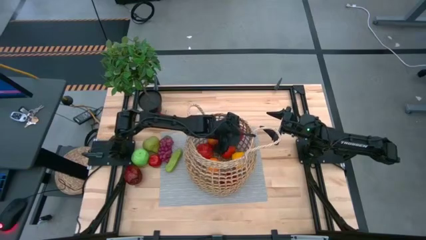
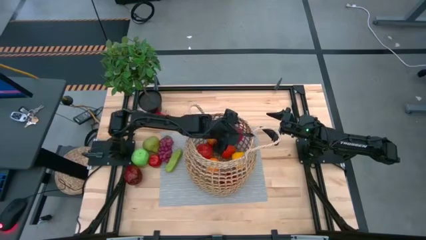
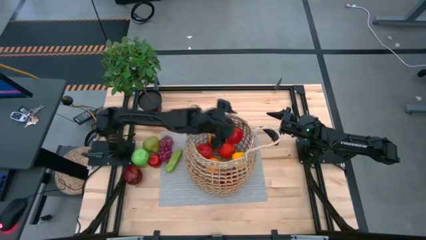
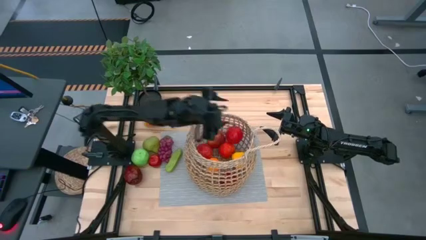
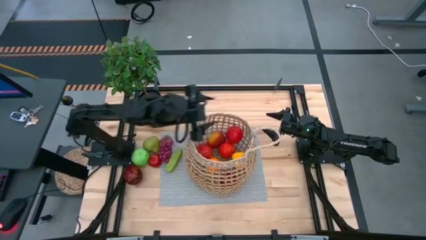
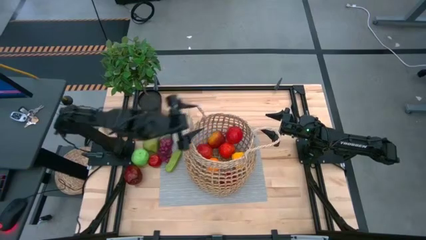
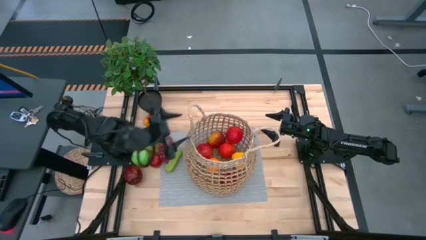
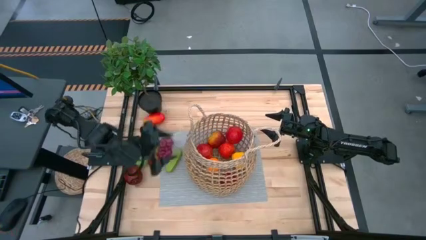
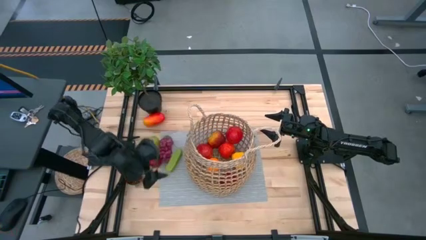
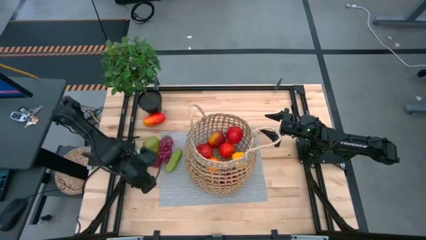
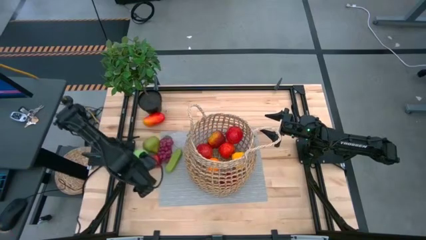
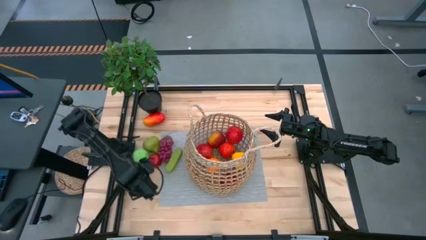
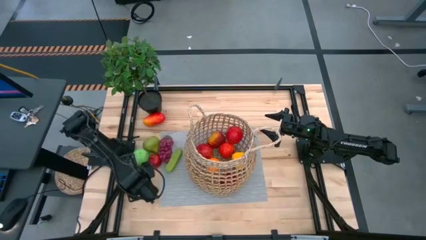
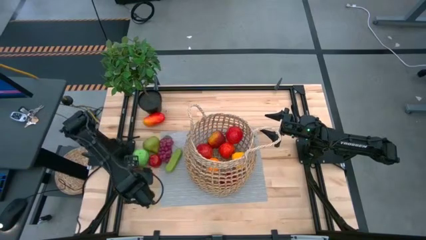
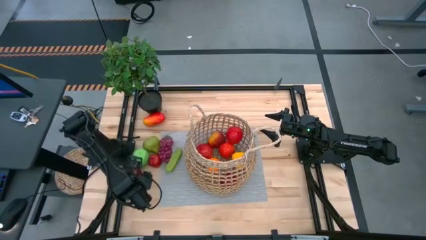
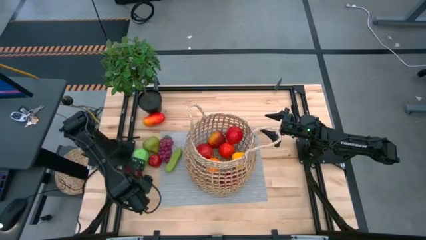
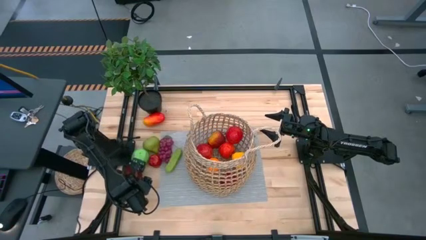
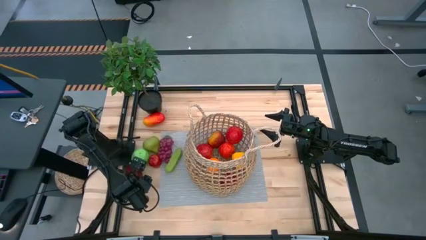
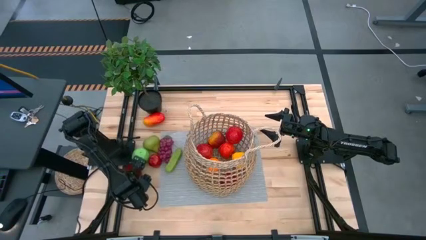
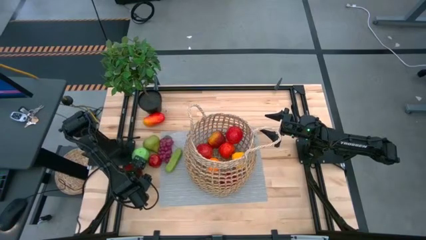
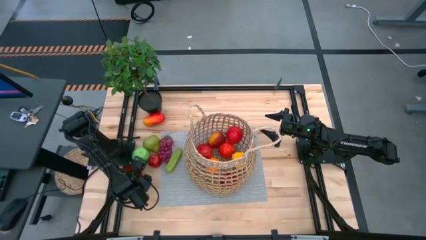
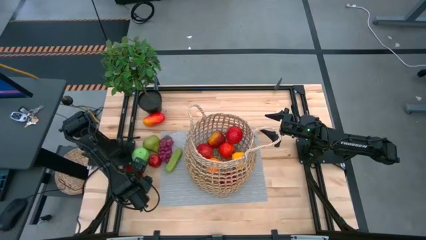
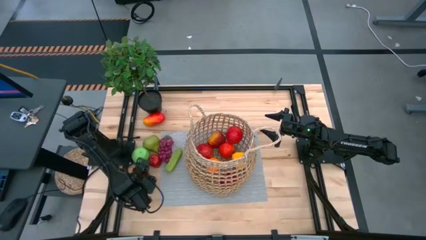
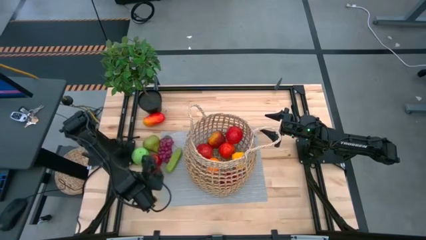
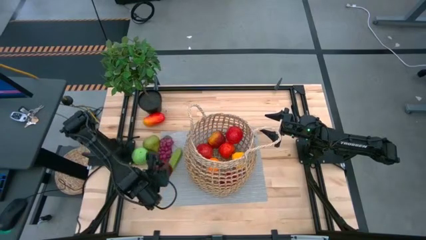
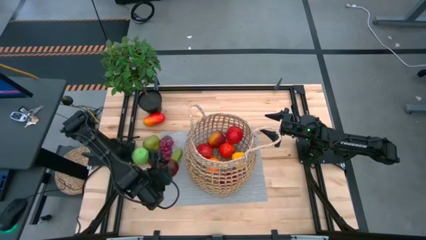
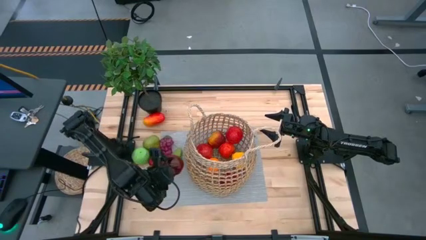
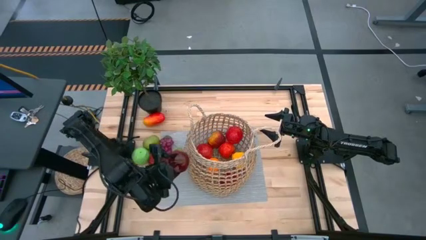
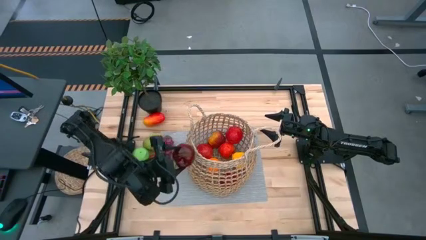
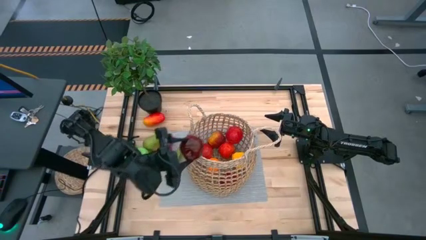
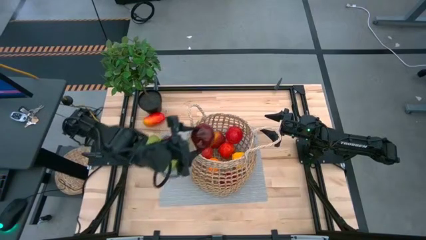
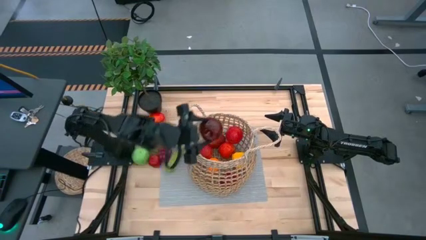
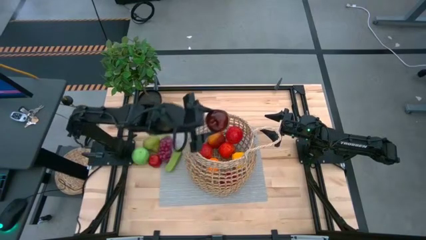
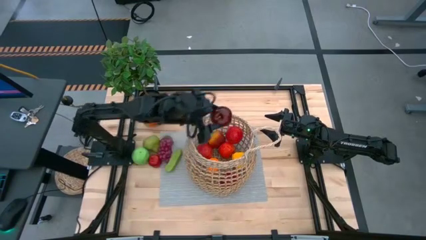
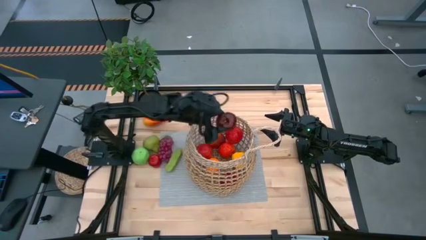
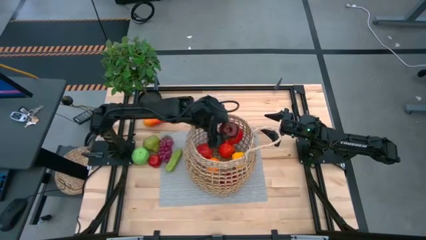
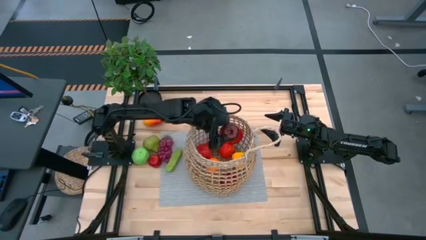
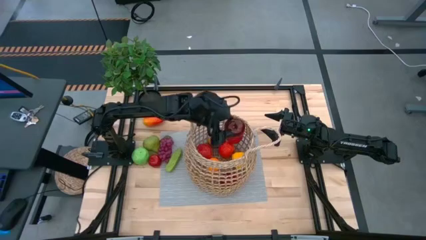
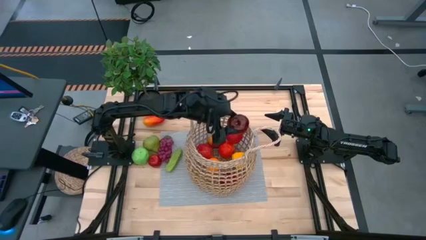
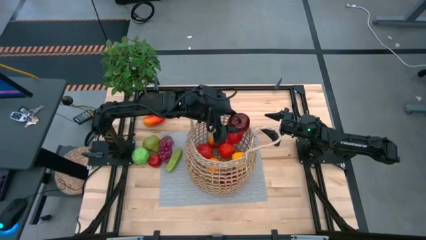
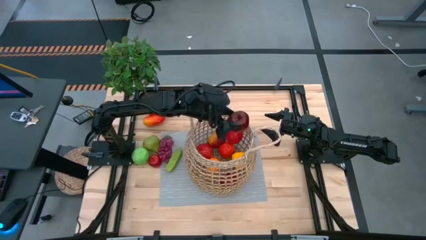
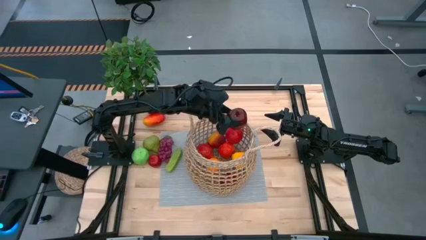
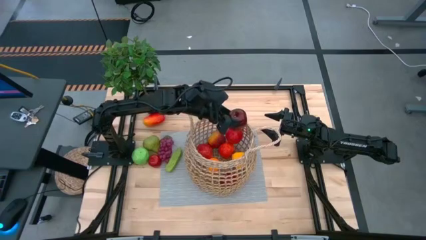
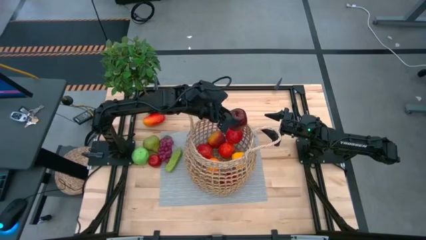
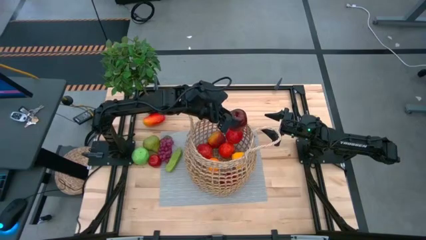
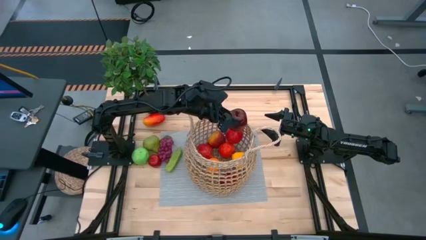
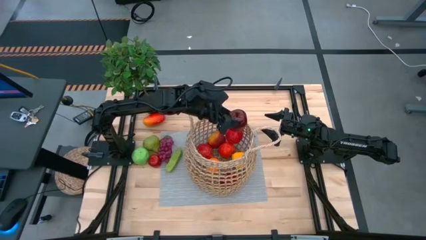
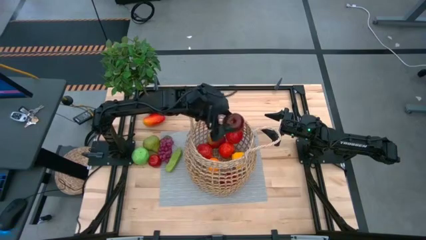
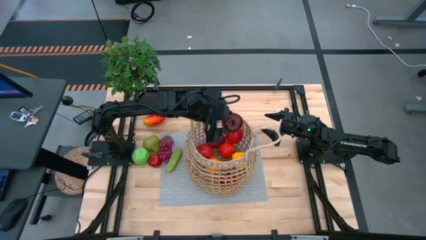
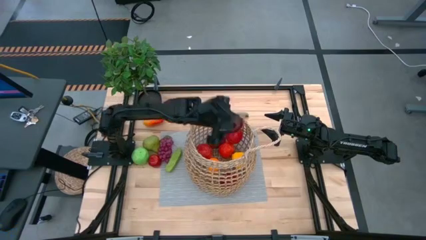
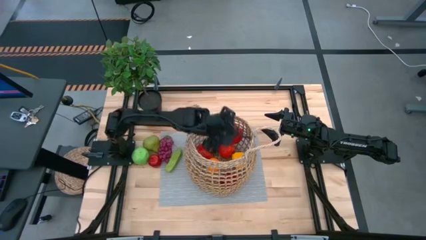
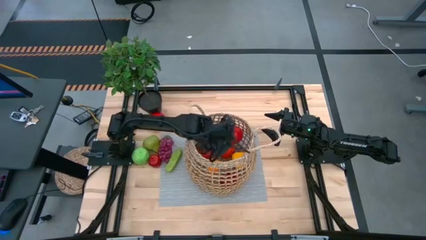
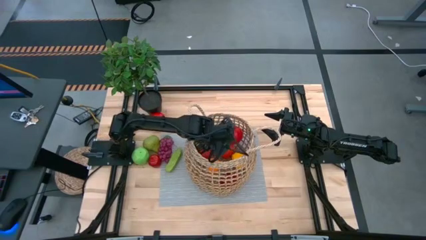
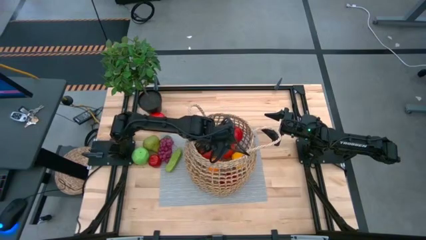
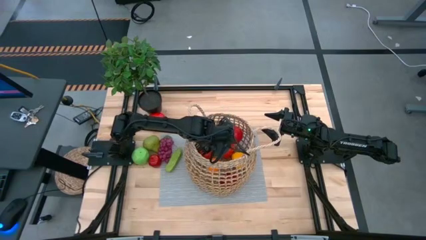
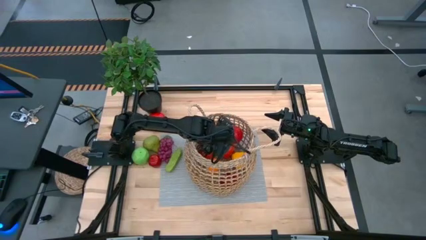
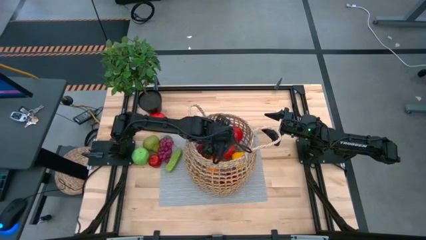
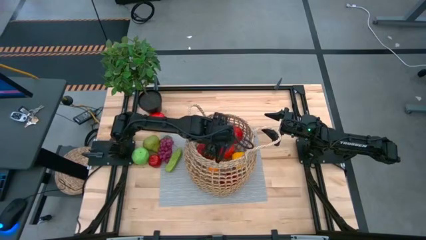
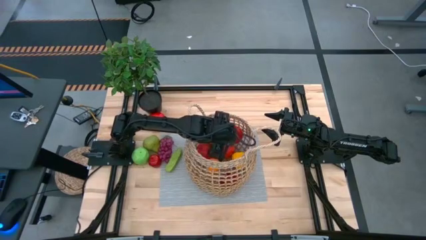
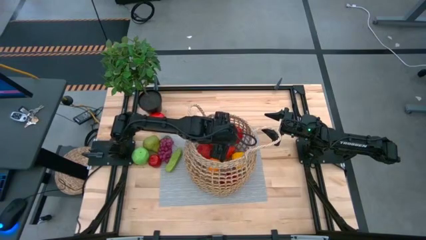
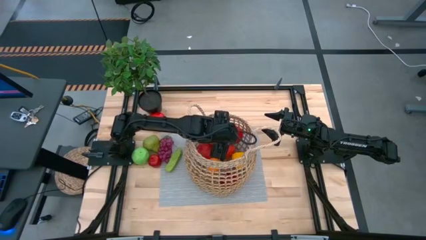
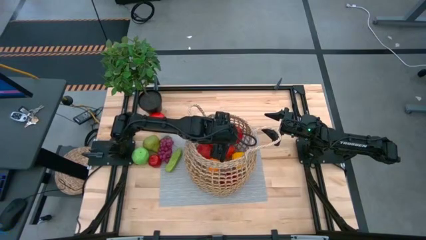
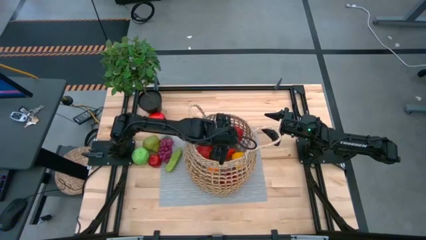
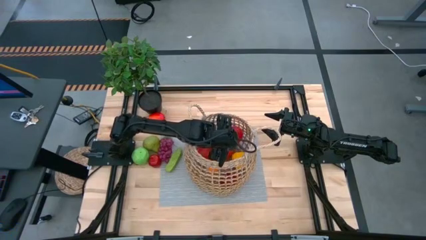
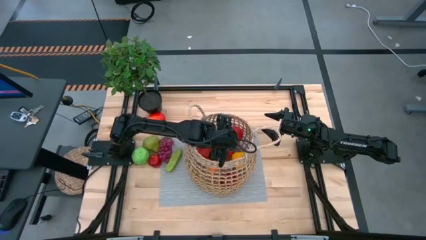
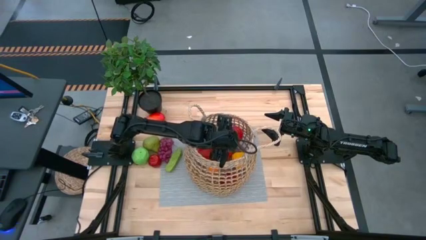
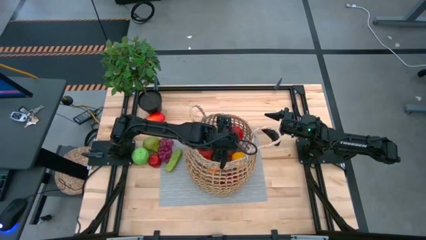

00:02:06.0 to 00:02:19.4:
Task: Build produce basket
Put the dark red apple into the brown basket

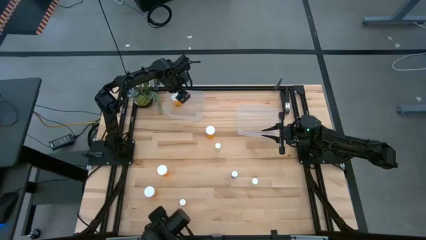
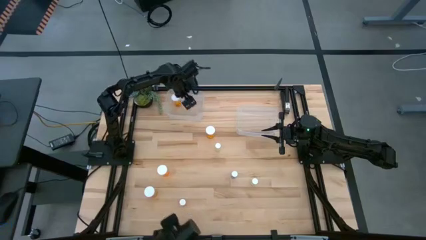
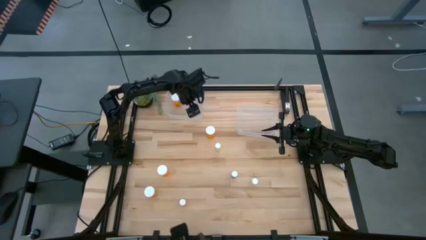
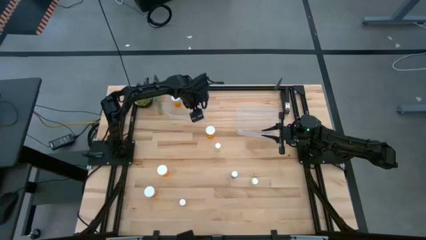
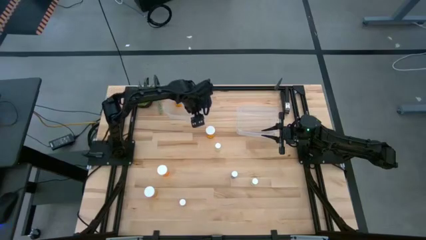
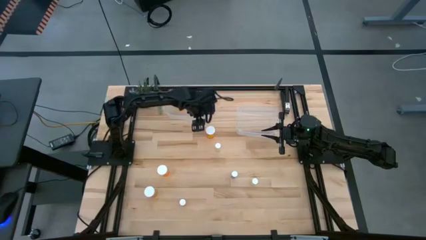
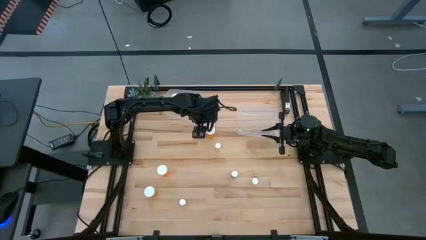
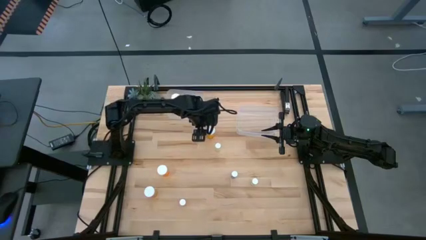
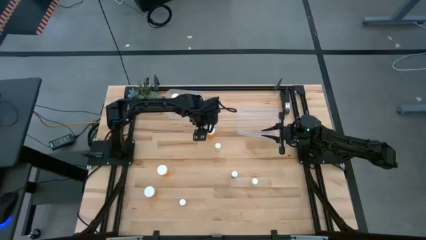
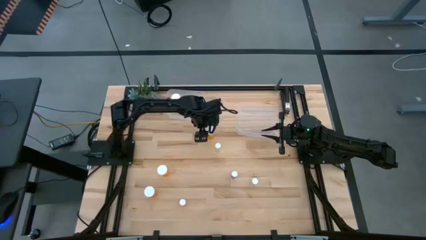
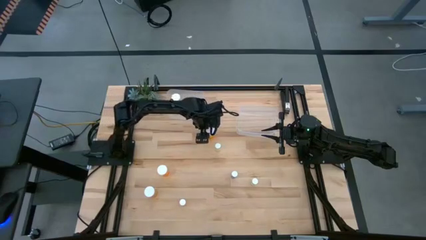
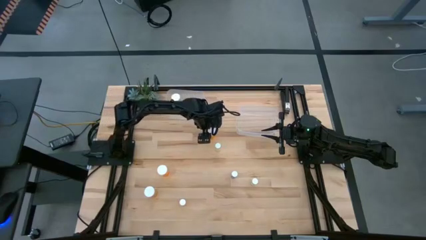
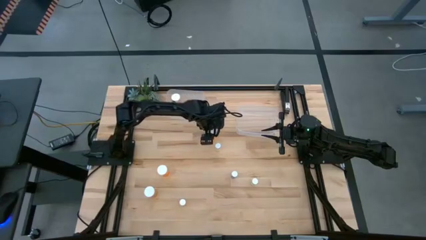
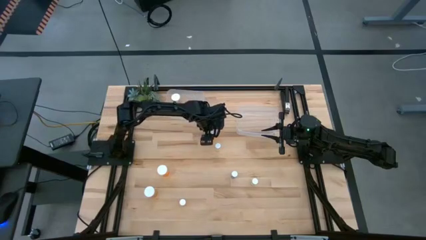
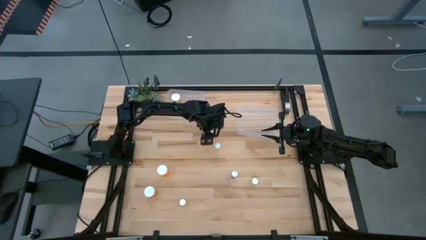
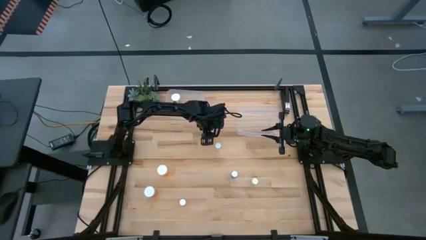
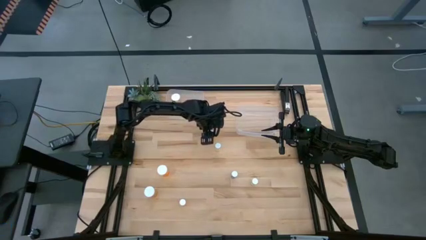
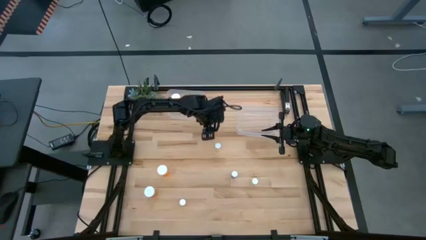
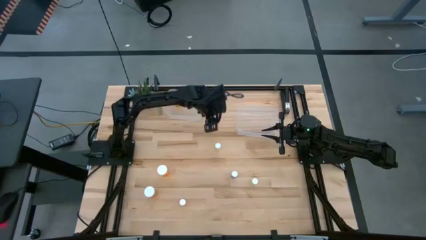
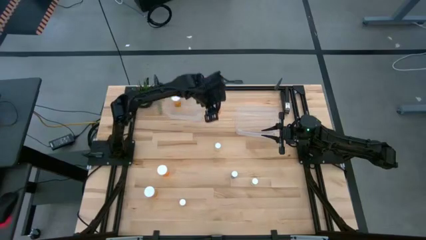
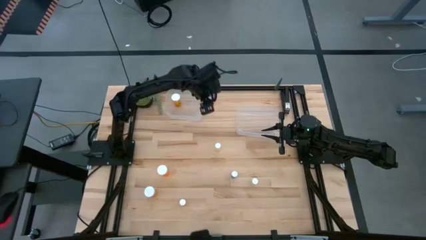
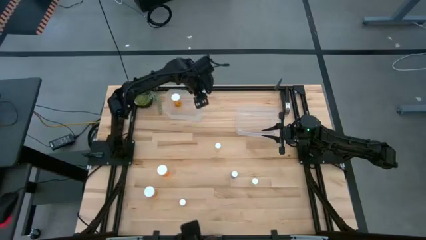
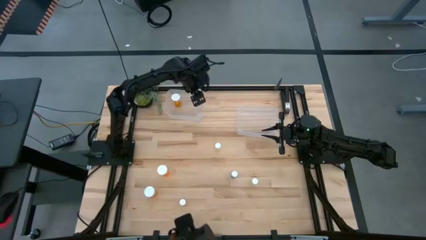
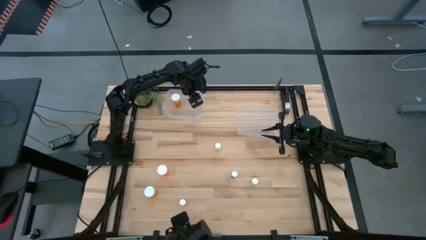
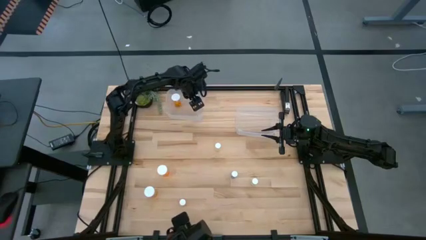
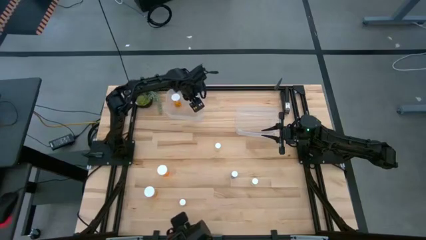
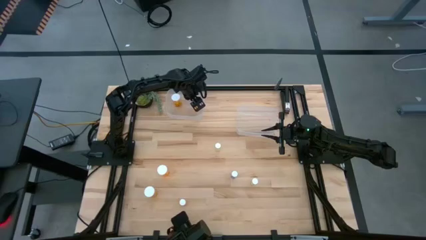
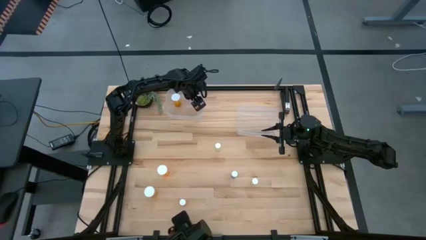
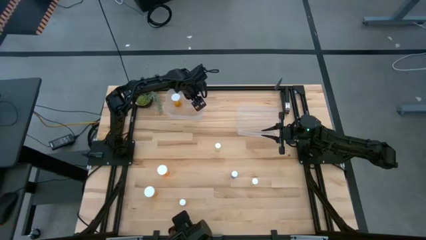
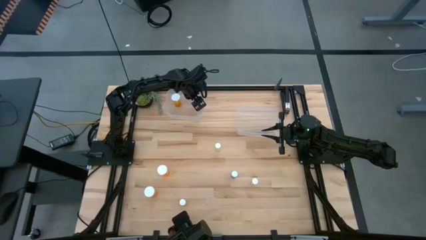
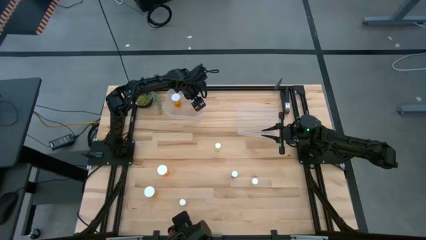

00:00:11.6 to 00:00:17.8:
Task: Pick and place medicine bottles into bin by pill shape (circle, oval)
Put the large orange pill bottle into the left transparent bin
